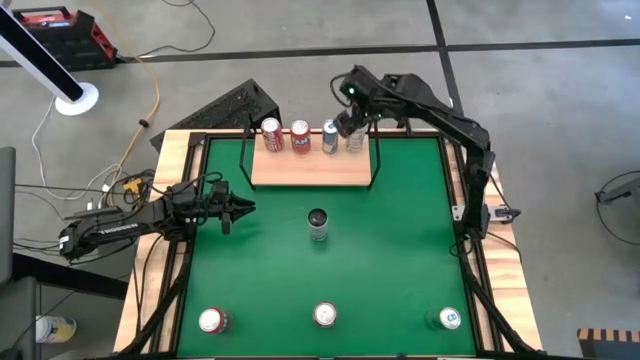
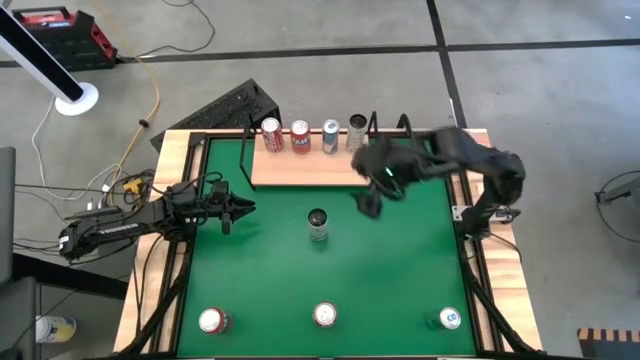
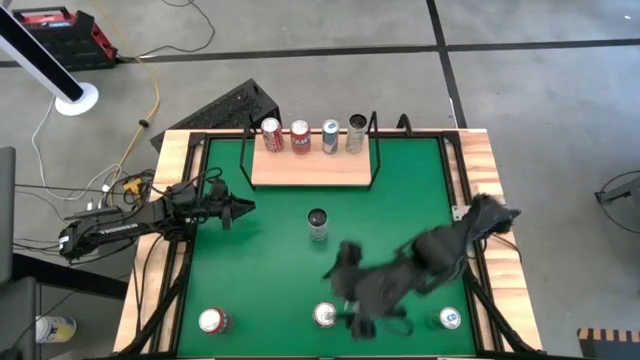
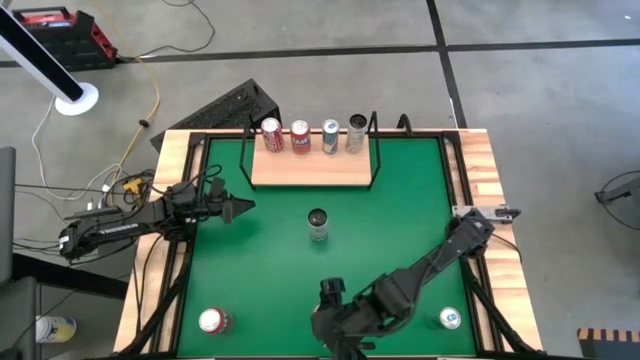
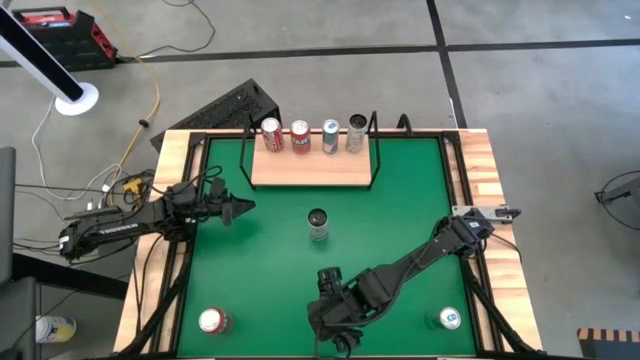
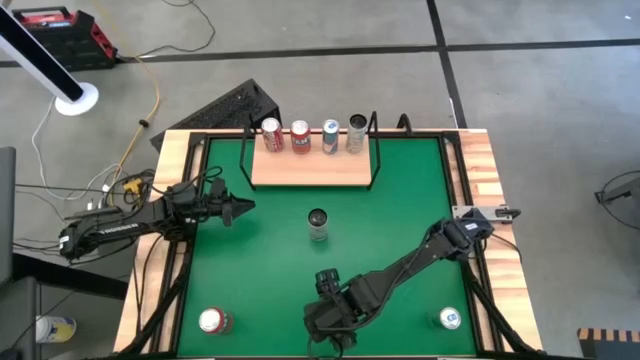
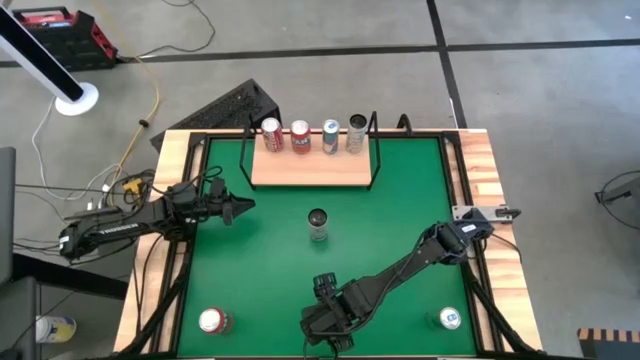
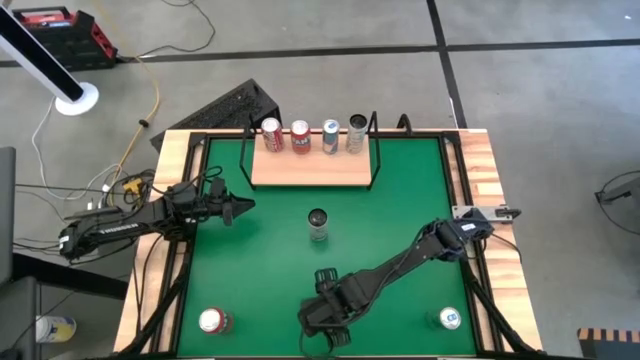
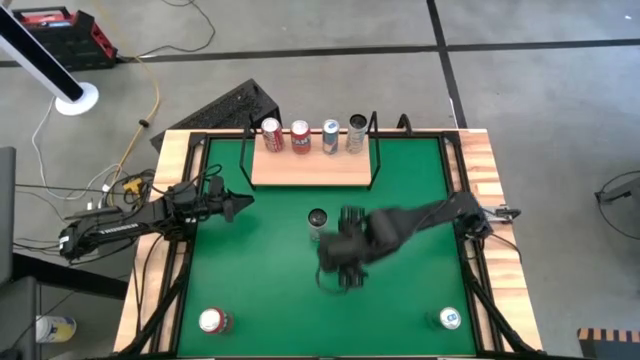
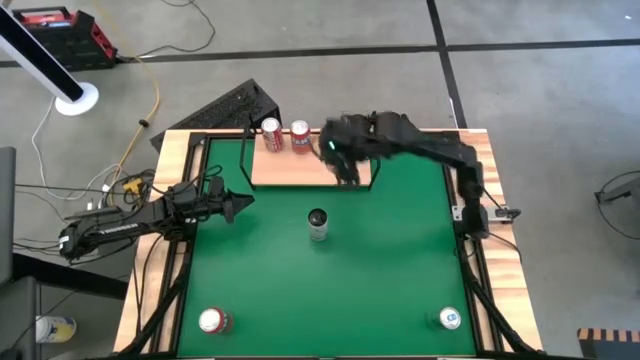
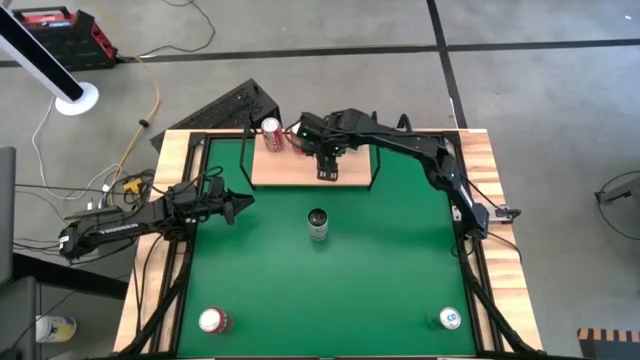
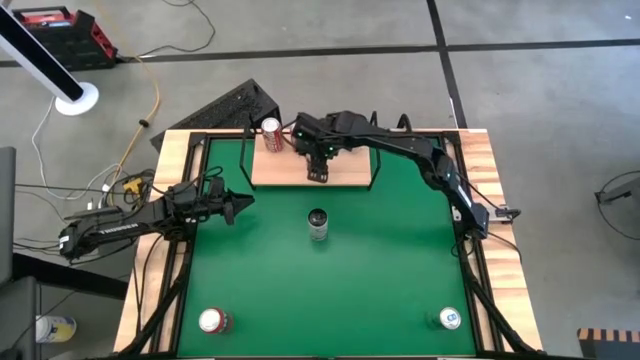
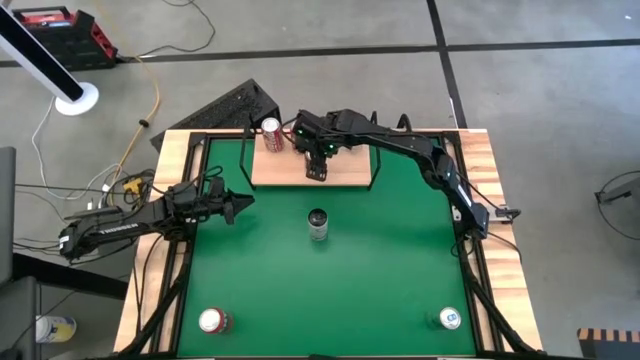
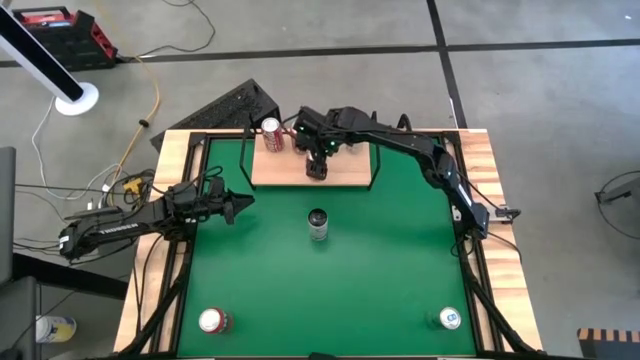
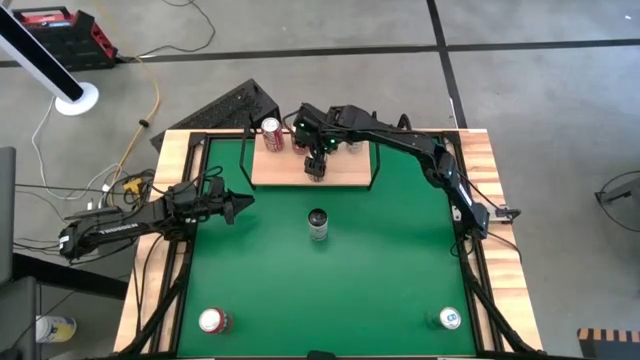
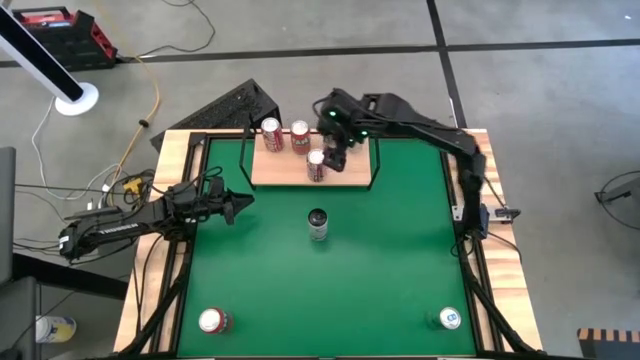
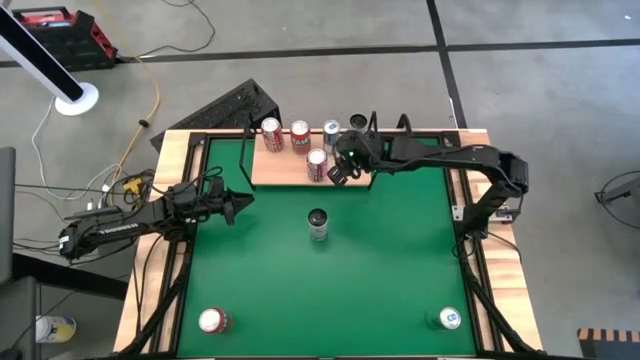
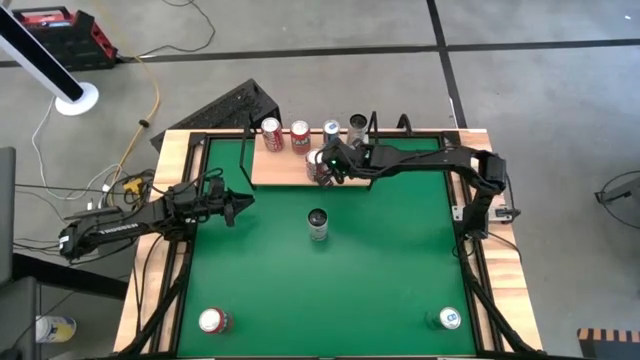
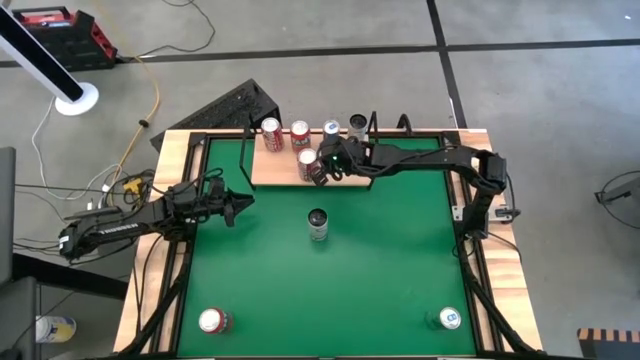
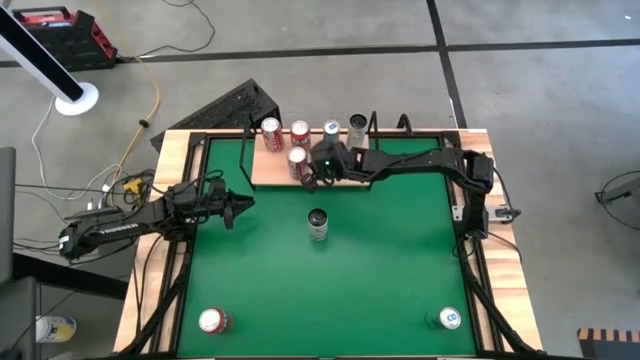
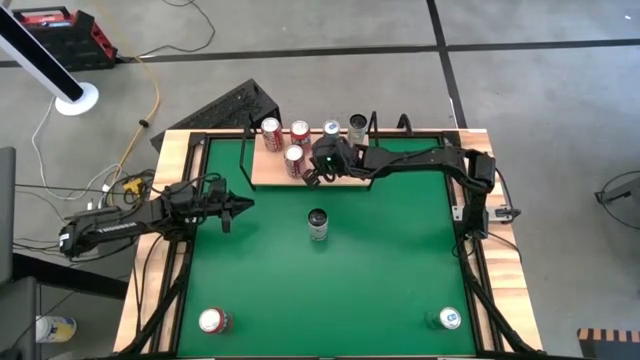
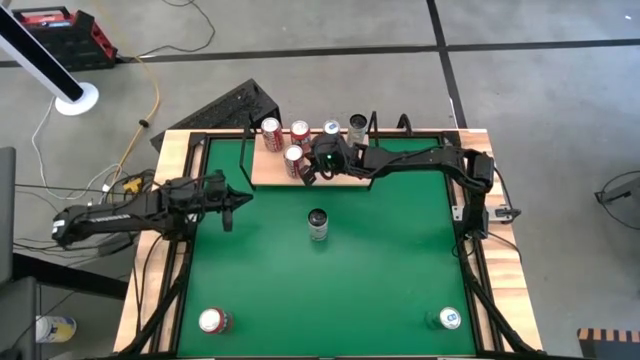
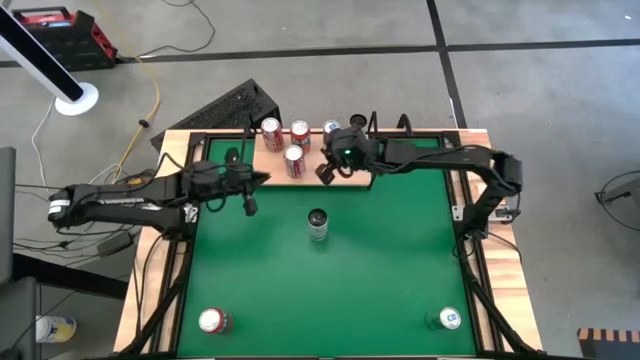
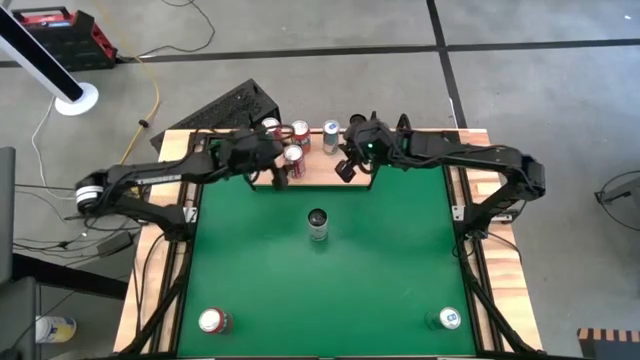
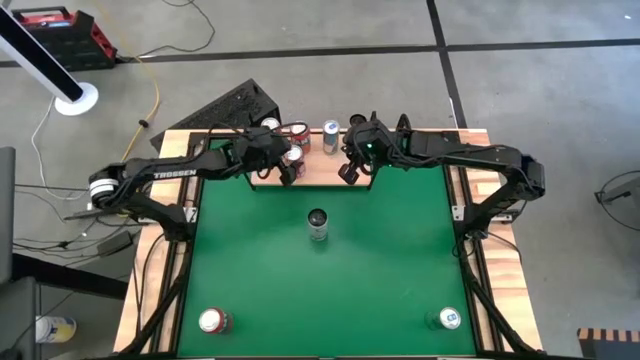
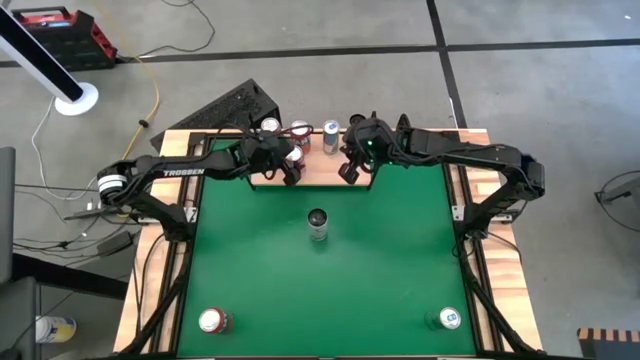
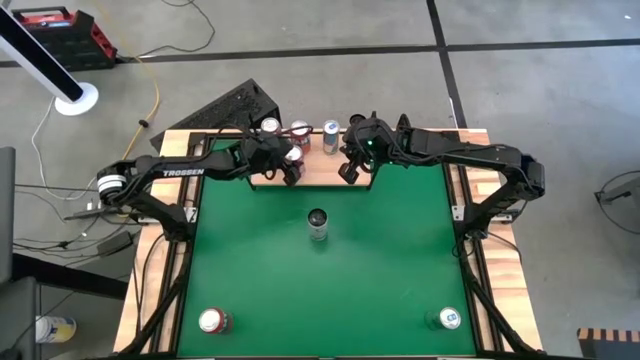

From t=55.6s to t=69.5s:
Task: Place canned beverage on shelf
Put the red-white soda can on the shelf aligned with the other red-white soda can

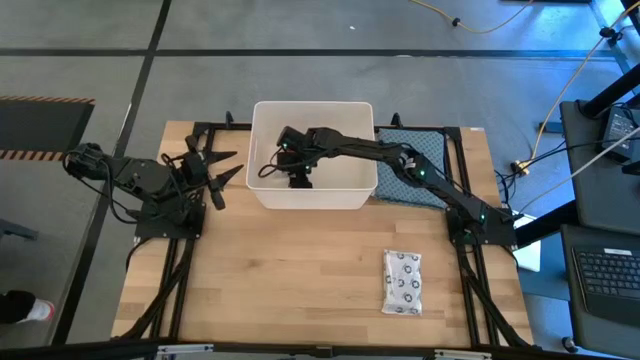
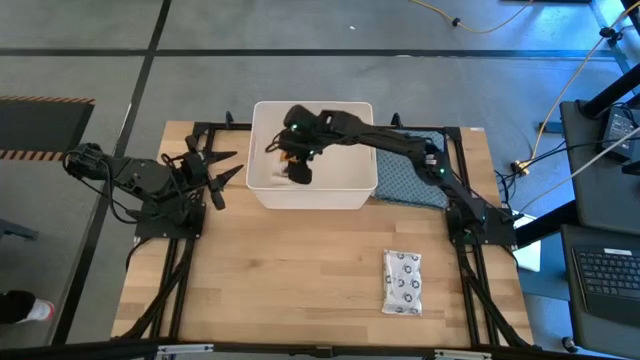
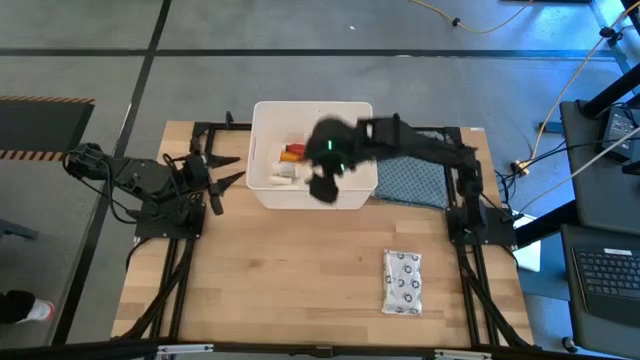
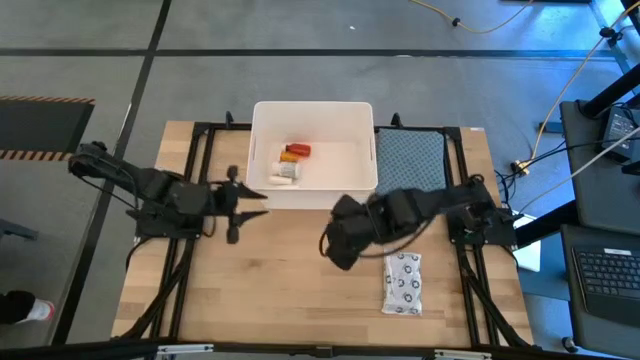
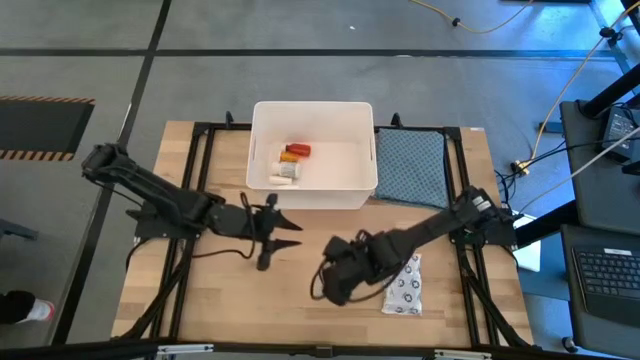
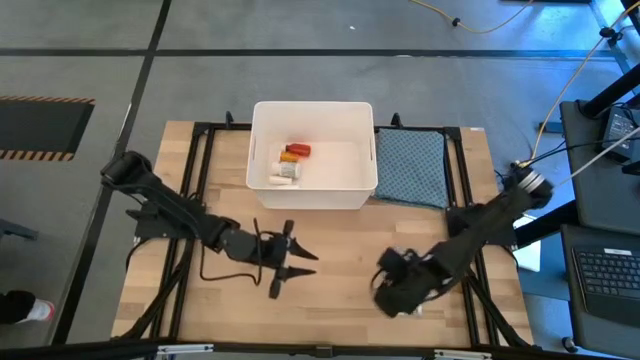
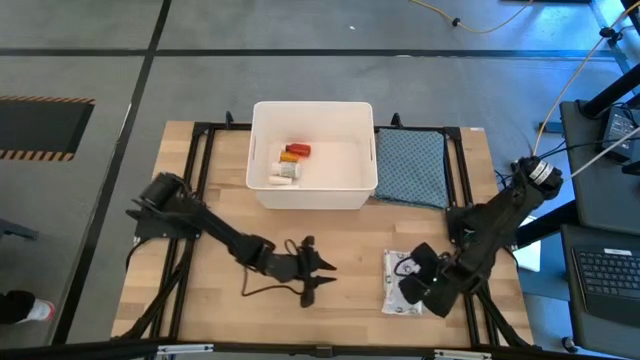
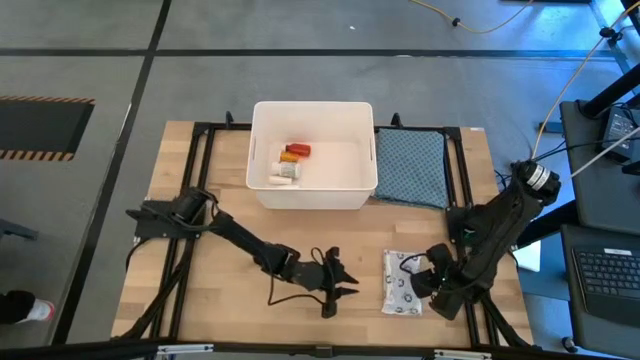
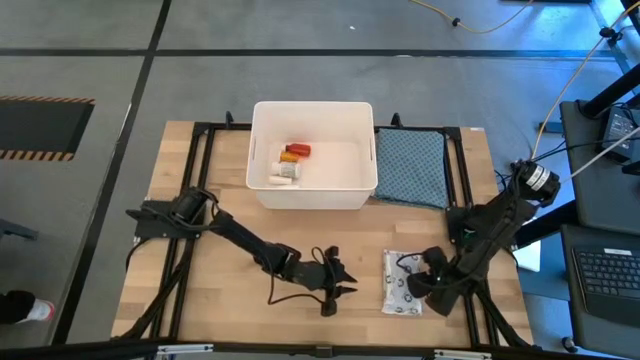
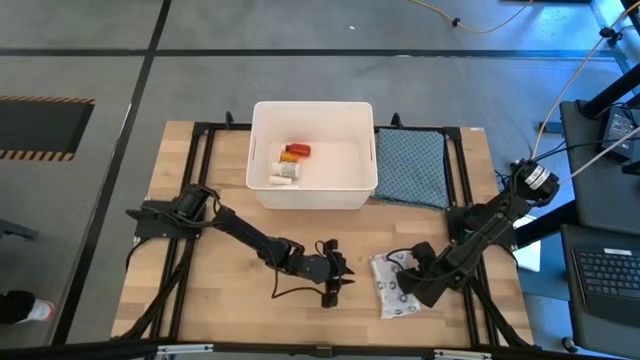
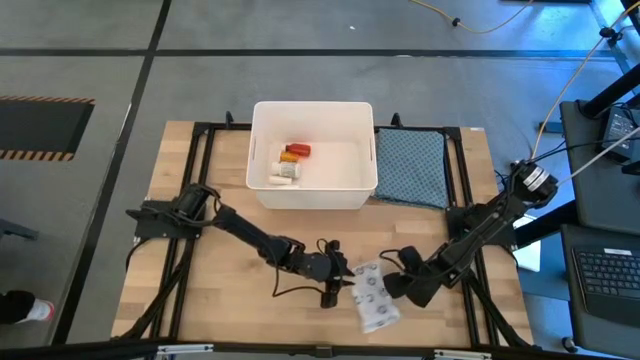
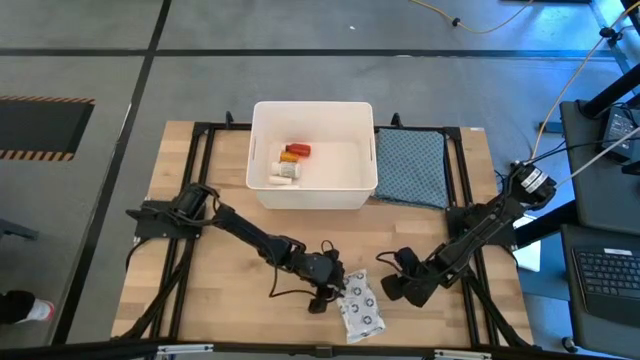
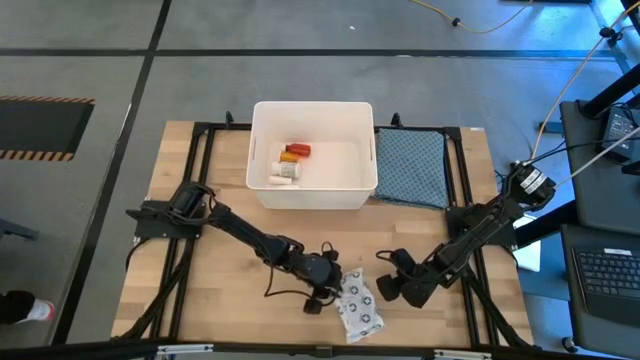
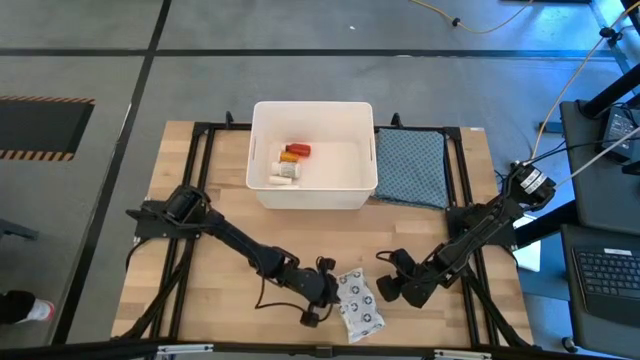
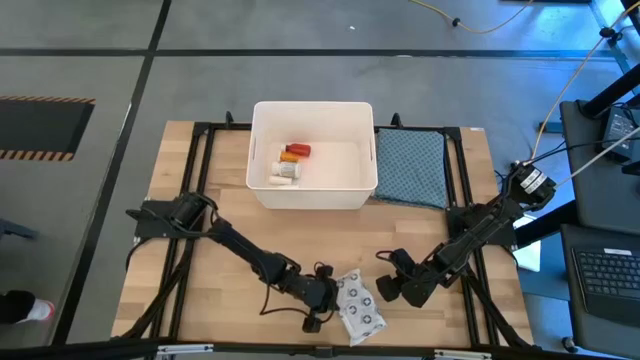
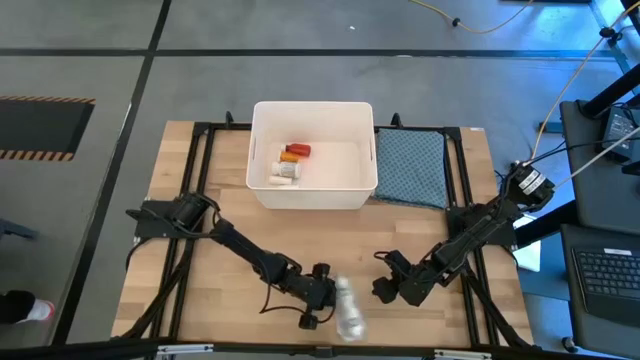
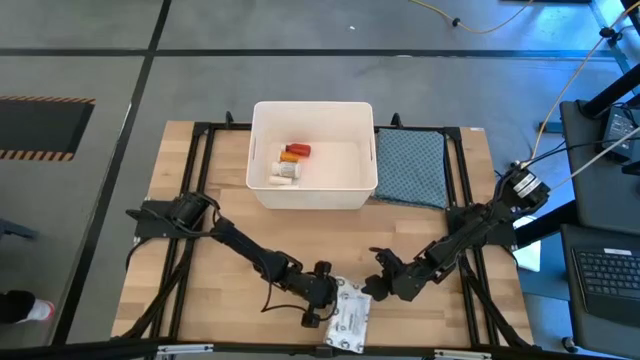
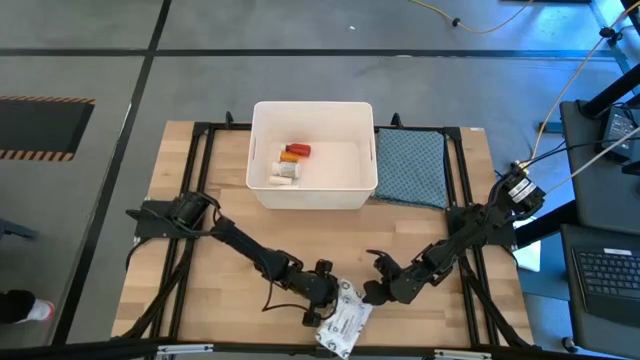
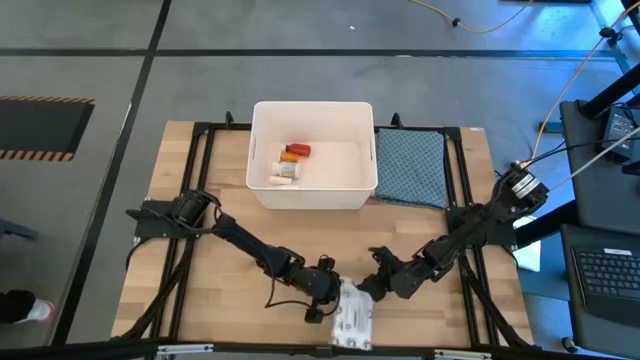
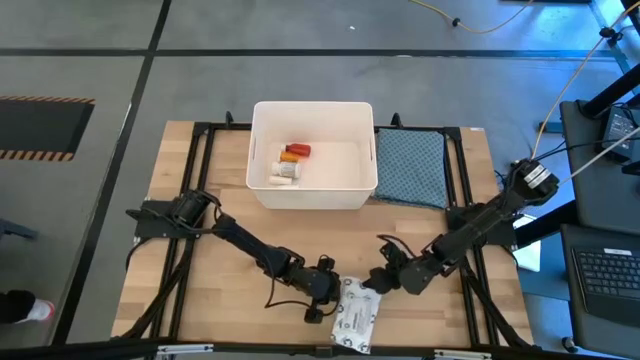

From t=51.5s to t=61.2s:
Task: Pick & place medical supplies in basket/bin
Put the white mailer bag into the white bin
